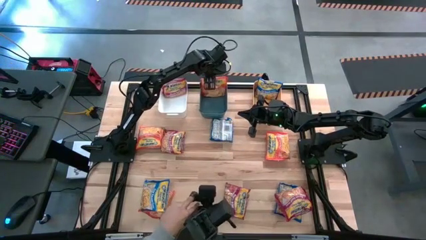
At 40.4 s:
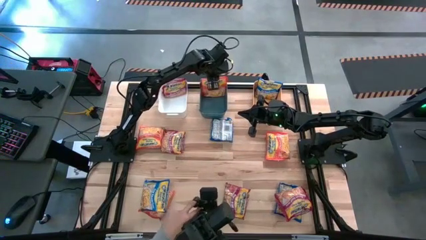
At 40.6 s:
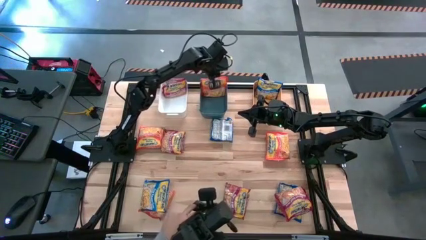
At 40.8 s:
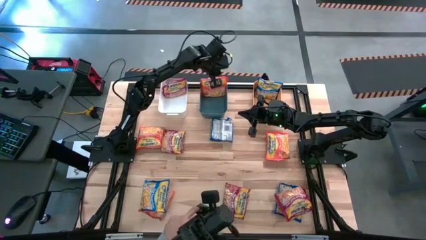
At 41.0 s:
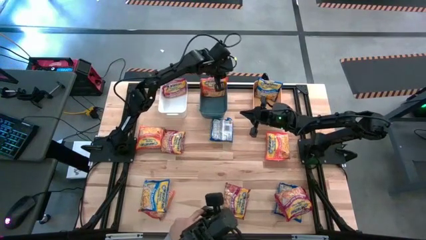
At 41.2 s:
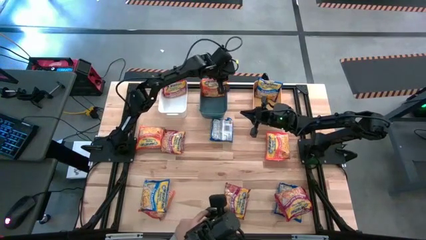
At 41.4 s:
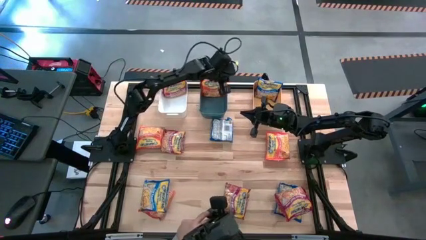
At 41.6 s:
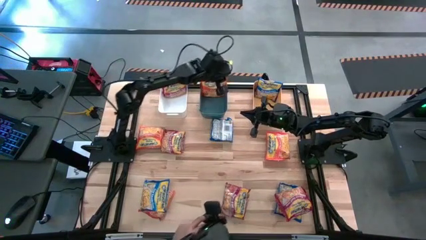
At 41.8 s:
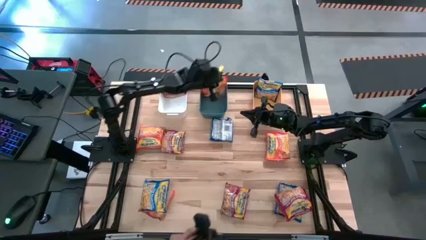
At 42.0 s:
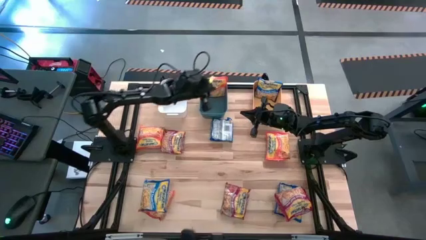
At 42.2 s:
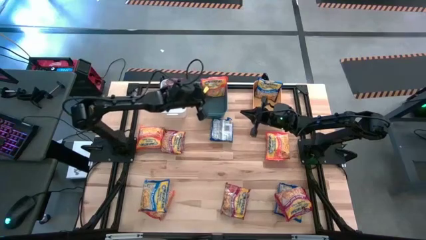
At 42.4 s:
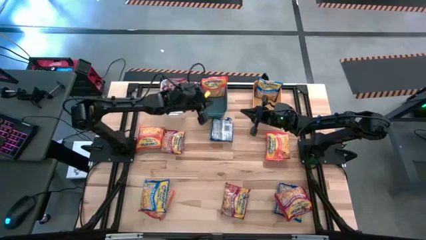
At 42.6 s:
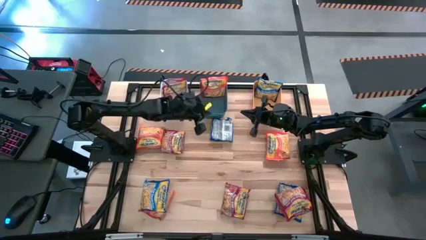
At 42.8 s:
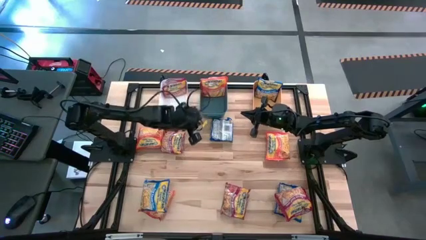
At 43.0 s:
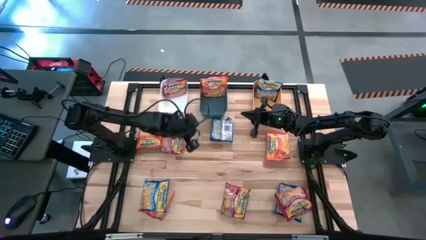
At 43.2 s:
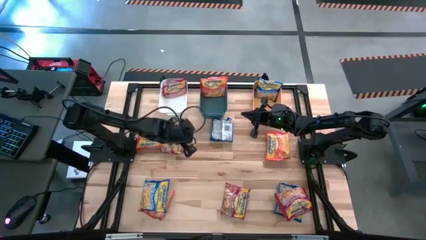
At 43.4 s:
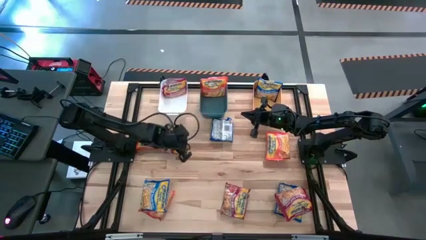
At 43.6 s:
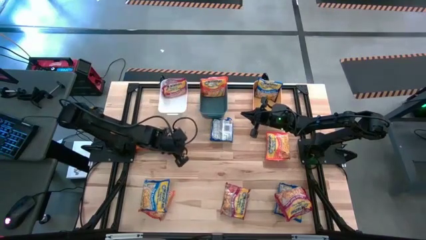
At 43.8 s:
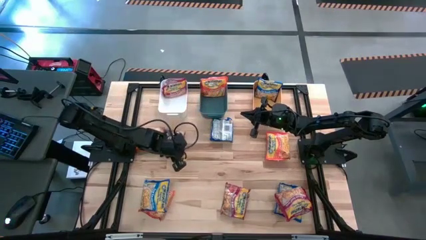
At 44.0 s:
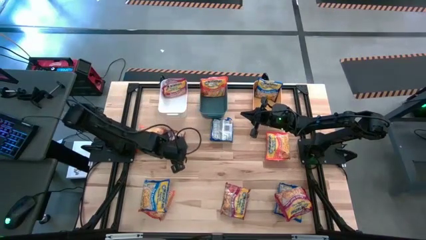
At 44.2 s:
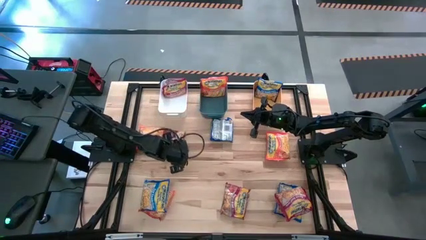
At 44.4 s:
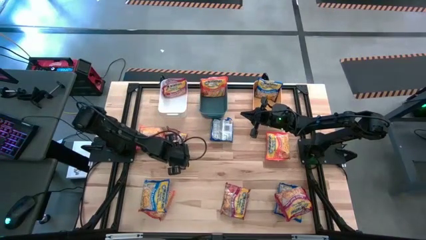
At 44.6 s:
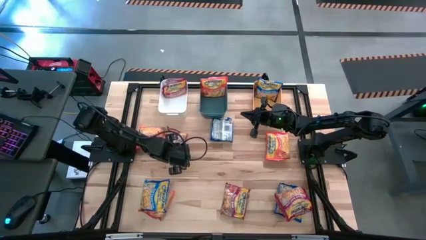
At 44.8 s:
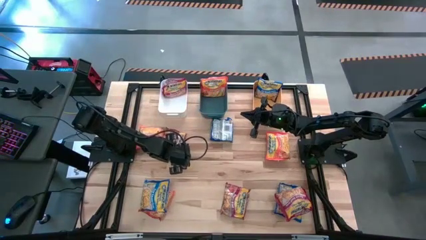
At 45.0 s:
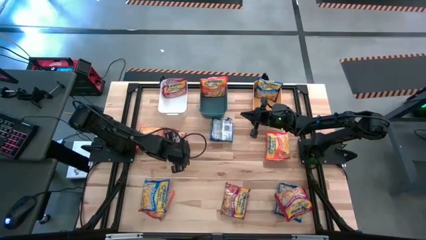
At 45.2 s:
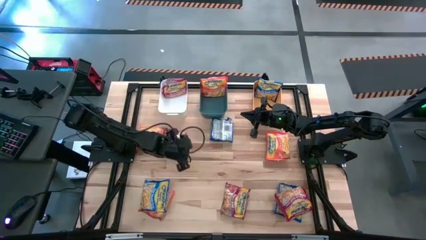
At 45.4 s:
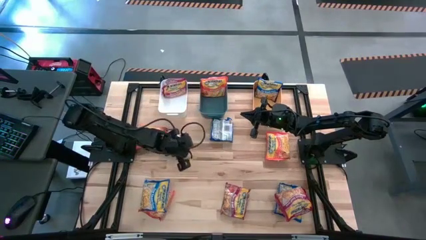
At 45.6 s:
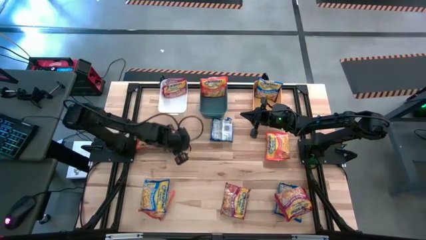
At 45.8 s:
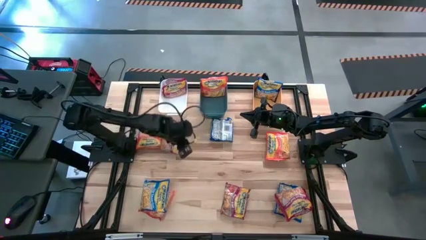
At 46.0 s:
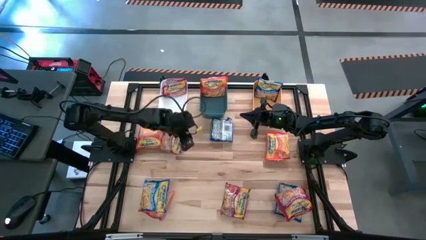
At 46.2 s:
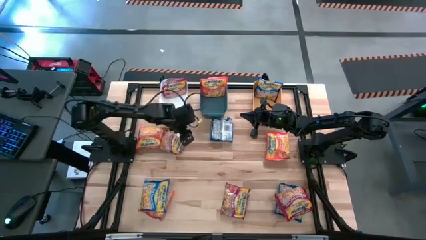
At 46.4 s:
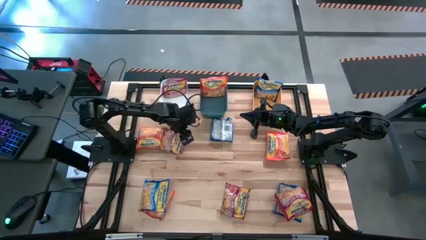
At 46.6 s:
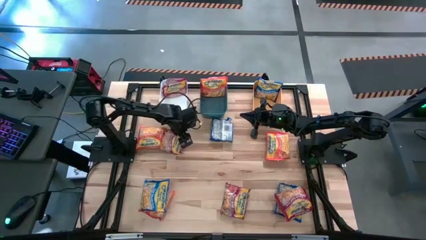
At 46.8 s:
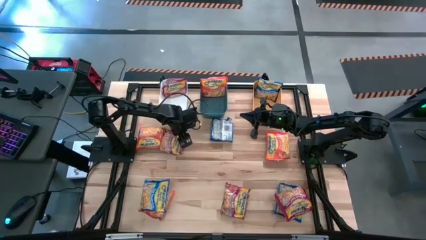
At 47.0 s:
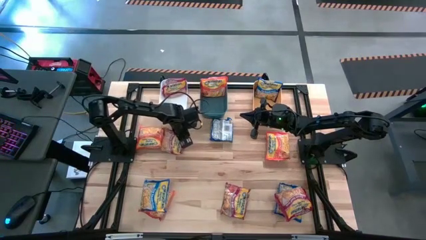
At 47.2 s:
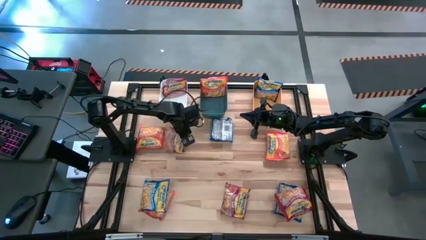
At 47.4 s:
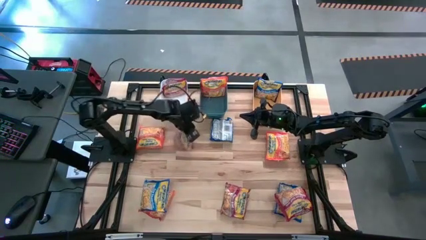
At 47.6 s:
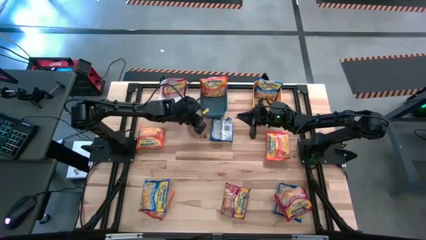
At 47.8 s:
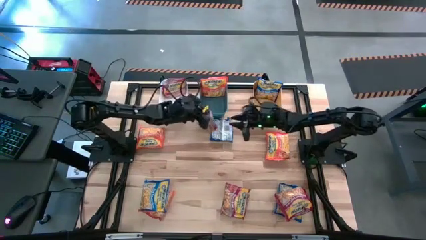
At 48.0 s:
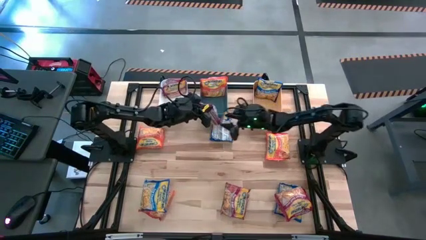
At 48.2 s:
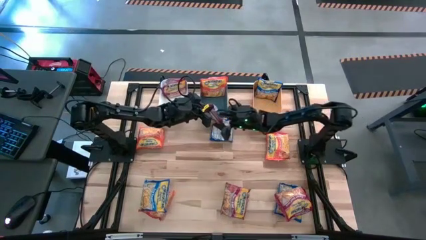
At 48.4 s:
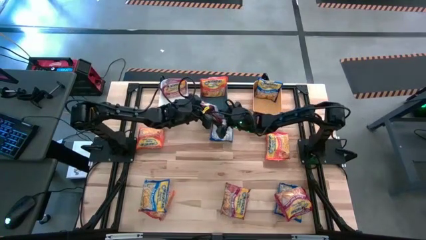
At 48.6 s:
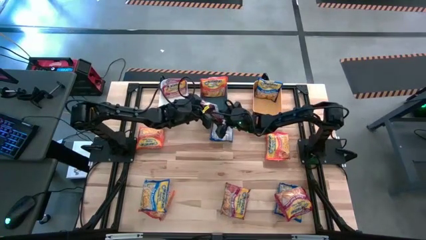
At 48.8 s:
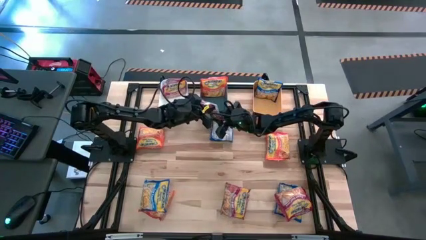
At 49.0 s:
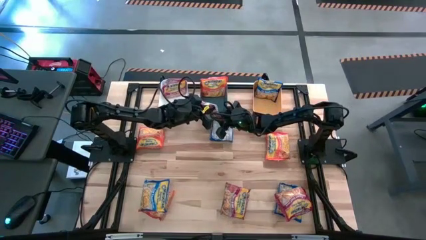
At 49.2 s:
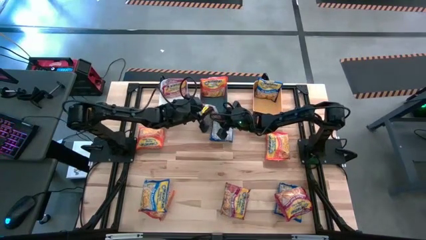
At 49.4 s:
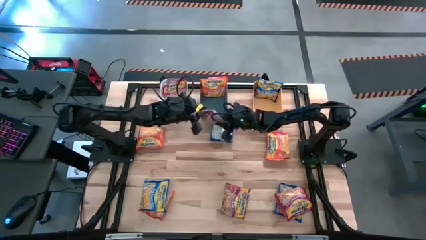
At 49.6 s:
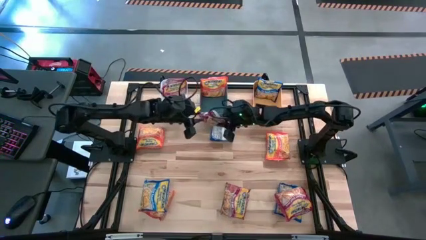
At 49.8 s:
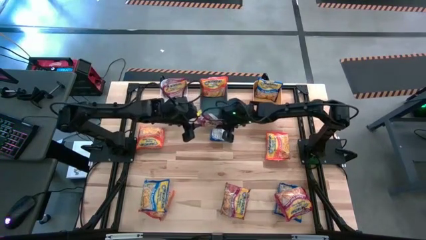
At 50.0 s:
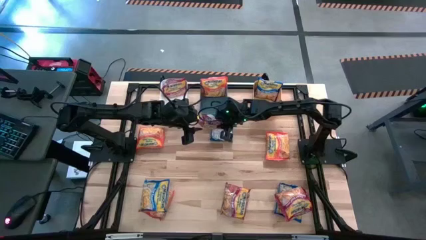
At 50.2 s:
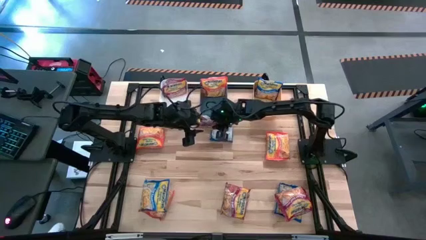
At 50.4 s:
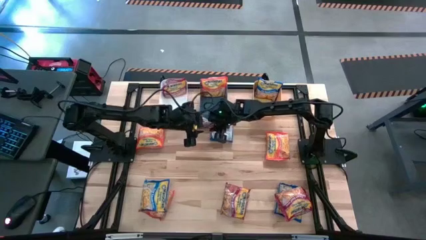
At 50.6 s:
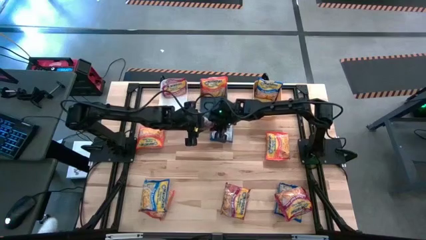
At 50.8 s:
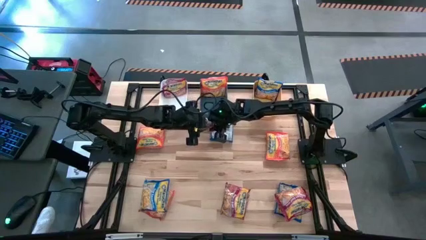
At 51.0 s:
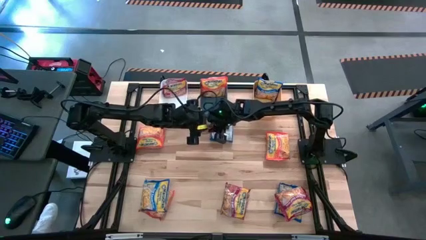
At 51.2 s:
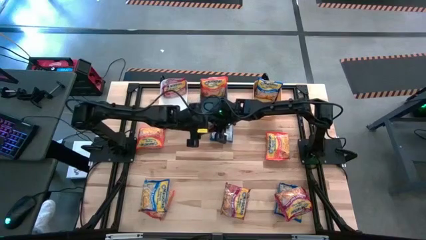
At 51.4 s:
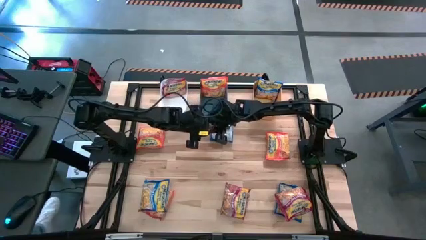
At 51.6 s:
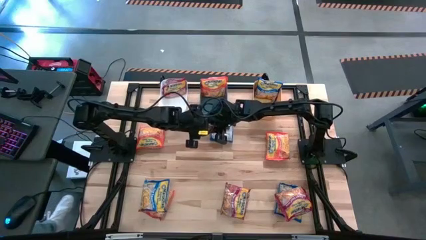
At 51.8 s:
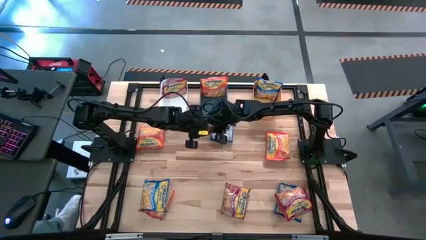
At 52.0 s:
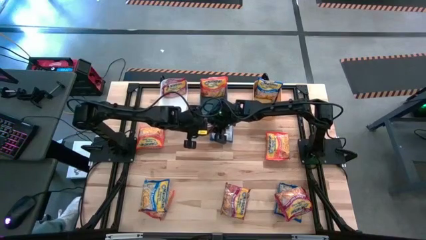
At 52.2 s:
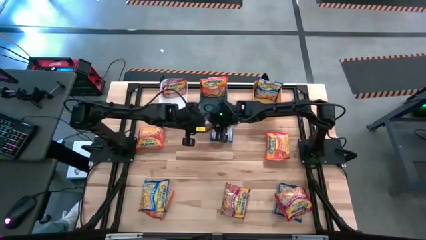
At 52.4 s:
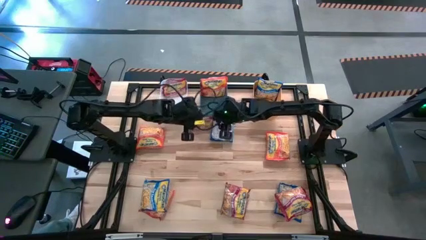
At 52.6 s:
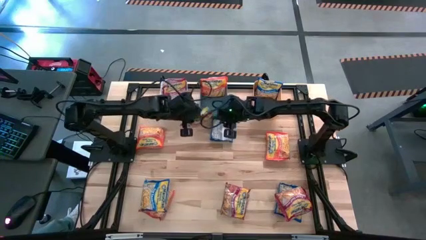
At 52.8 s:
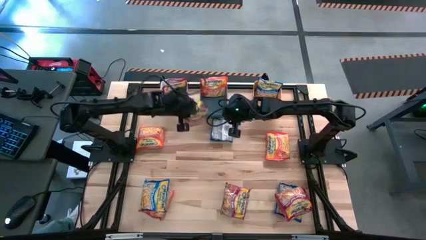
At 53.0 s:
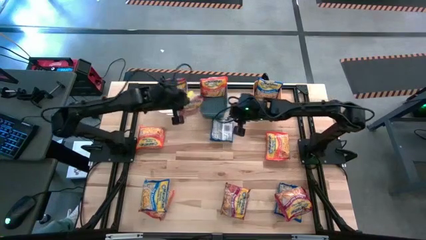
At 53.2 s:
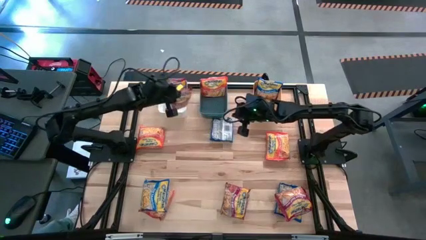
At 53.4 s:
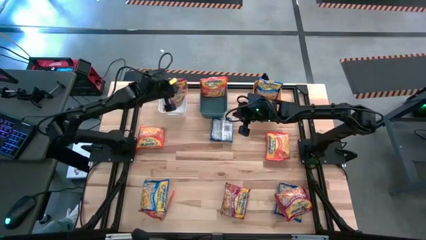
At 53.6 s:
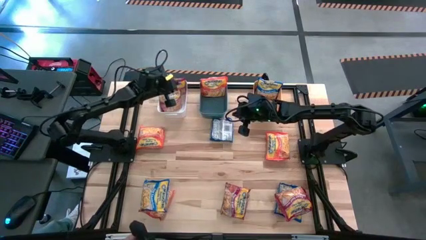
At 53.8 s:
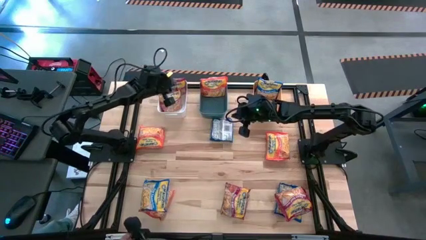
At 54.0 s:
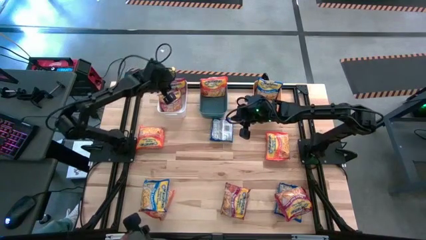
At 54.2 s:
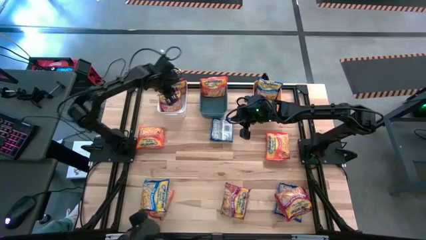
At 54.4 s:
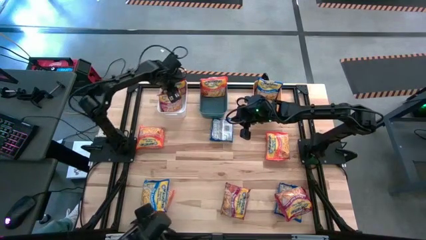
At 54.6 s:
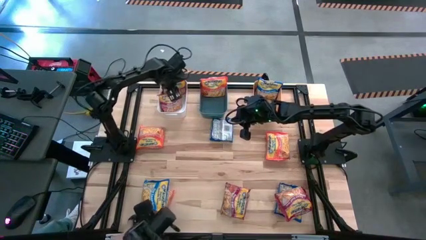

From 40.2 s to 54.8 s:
Task: Sort Maruchan noodles
Put the red noodle pack into the white bin

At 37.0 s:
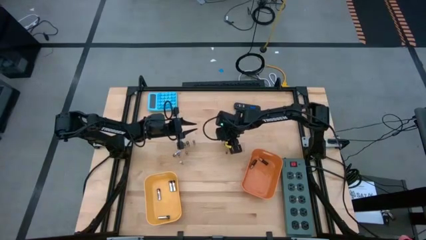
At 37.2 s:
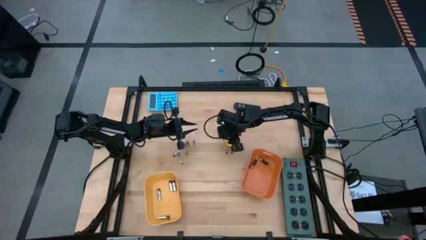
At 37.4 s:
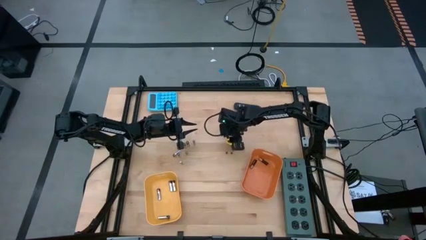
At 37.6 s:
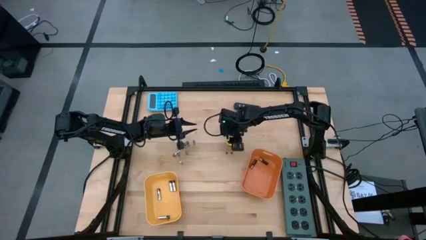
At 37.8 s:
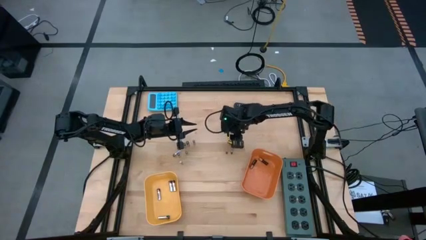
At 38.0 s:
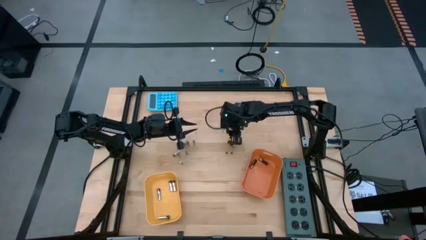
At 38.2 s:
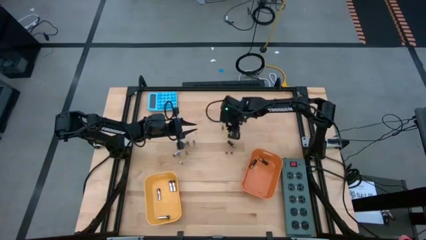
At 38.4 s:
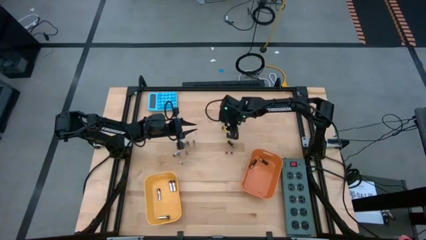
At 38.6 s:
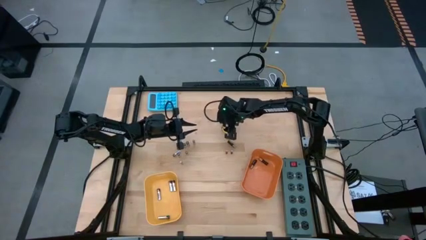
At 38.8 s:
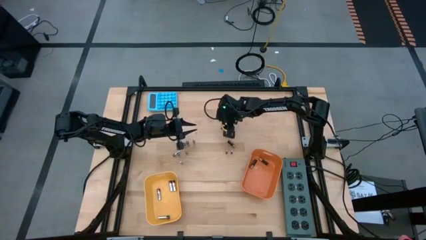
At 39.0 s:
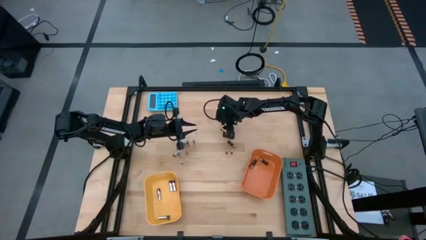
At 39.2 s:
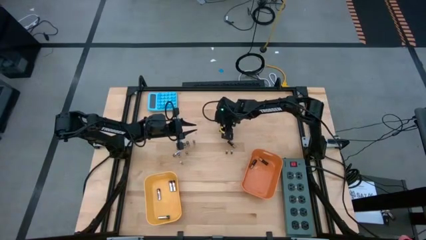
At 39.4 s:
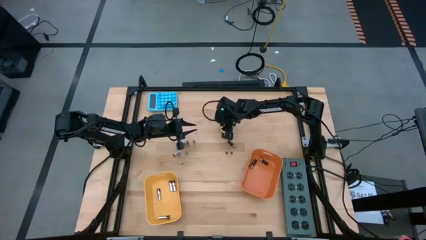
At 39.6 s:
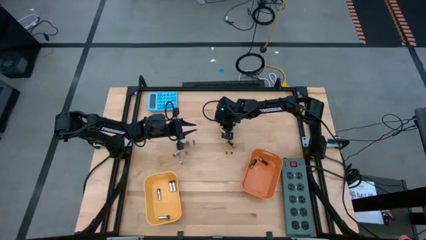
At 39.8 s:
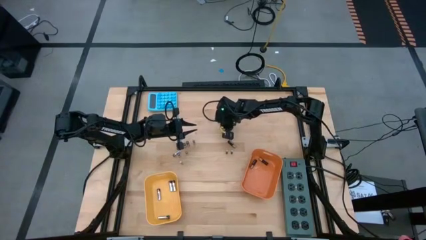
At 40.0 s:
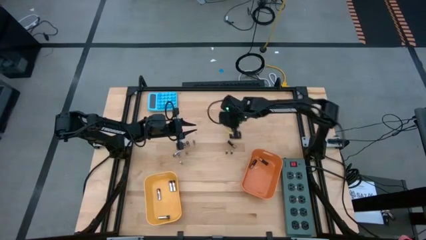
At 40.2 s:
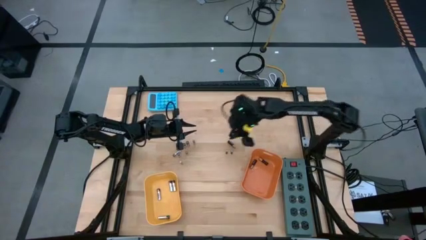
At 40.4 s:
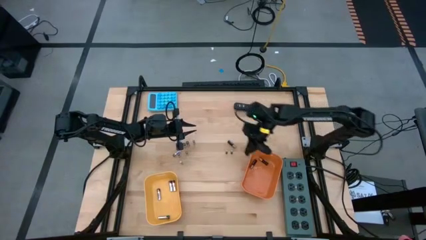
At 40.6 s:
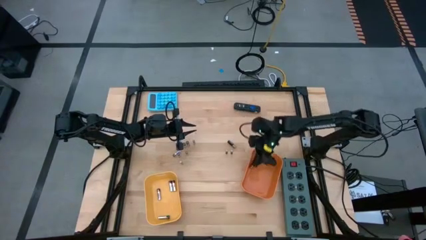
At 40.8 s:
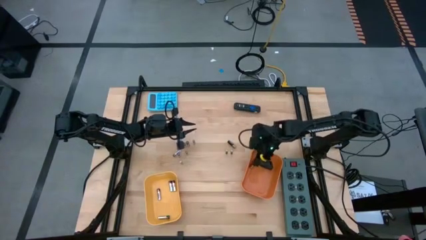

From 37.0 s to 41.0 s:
Task: Sort batteries
Put the brown battery into the orange bin
